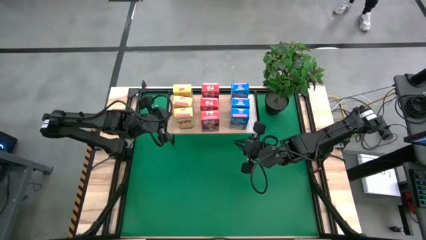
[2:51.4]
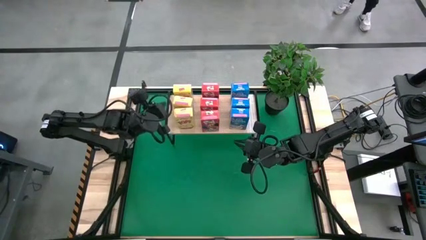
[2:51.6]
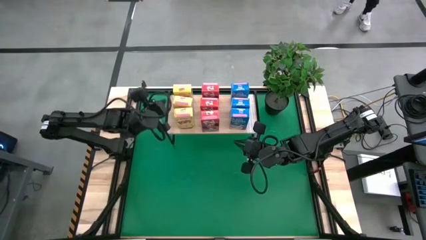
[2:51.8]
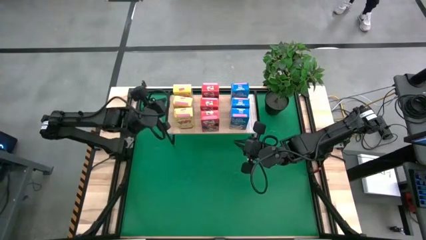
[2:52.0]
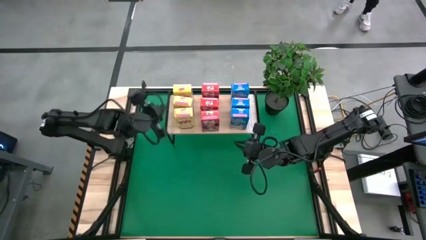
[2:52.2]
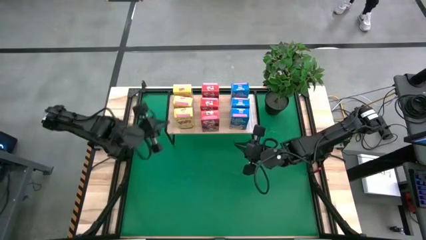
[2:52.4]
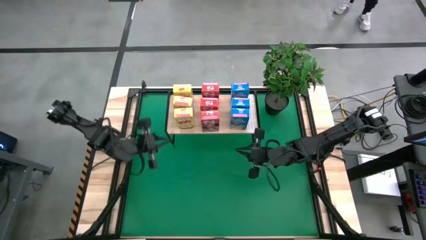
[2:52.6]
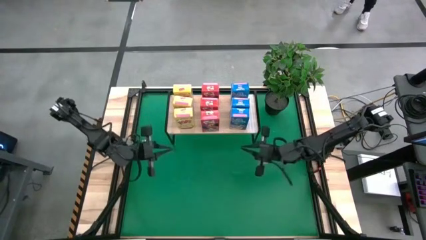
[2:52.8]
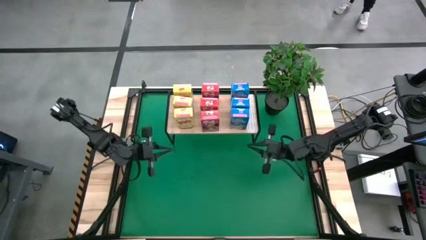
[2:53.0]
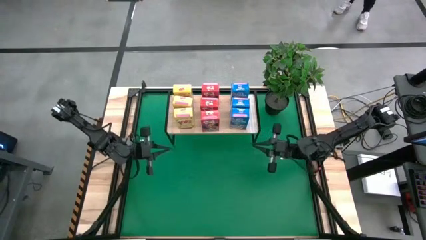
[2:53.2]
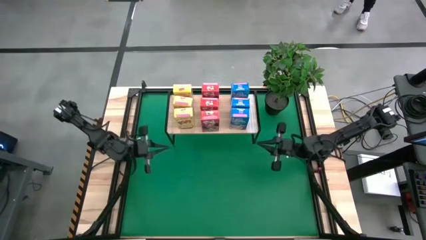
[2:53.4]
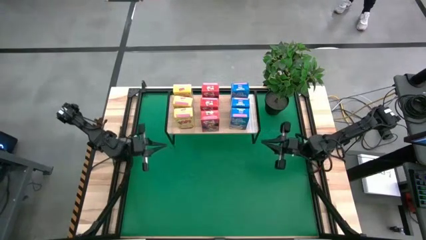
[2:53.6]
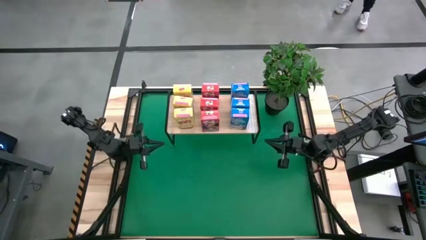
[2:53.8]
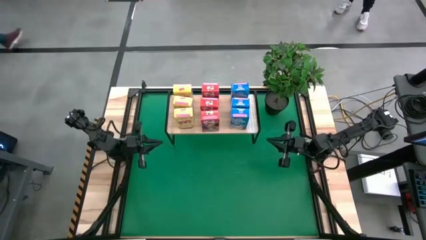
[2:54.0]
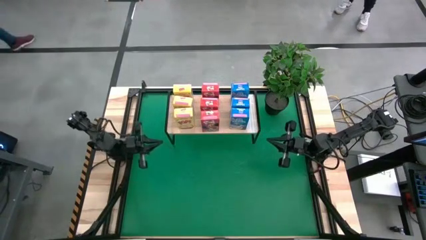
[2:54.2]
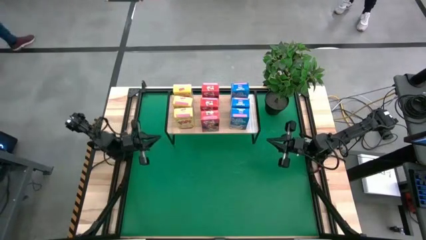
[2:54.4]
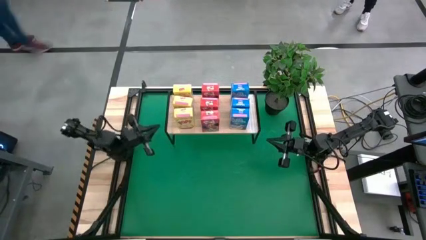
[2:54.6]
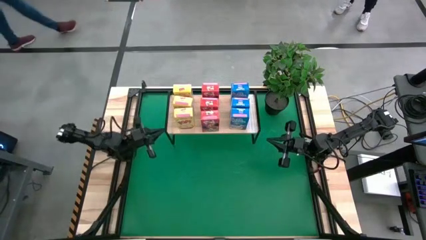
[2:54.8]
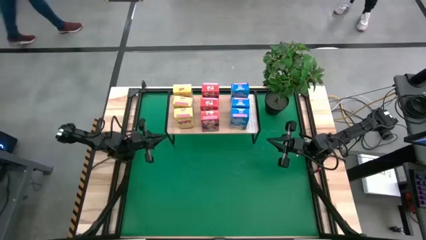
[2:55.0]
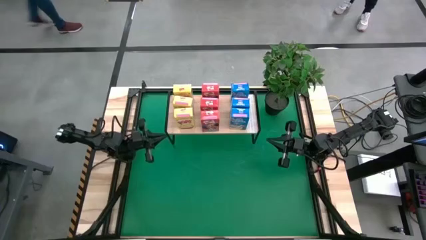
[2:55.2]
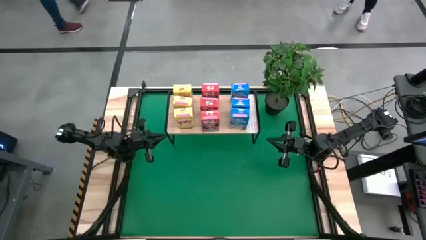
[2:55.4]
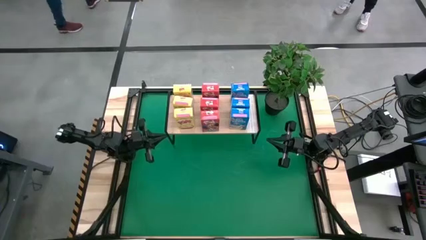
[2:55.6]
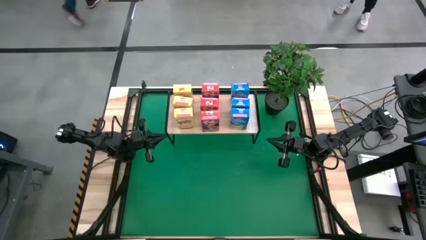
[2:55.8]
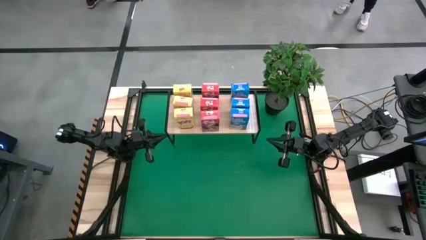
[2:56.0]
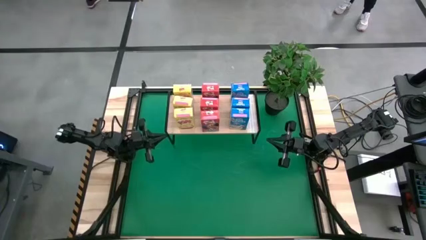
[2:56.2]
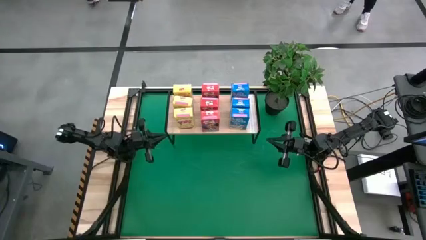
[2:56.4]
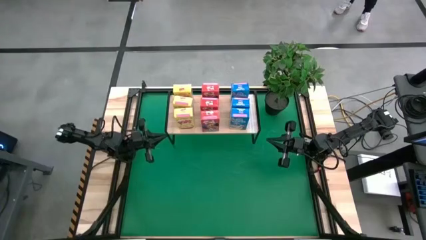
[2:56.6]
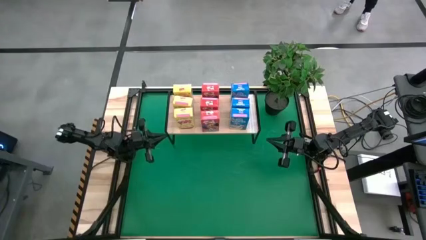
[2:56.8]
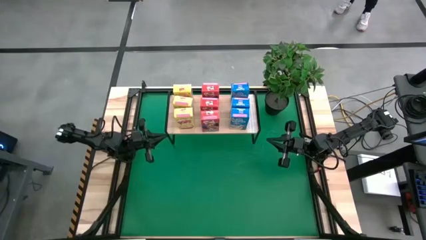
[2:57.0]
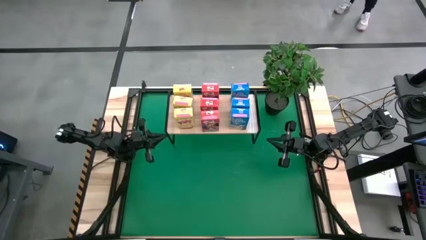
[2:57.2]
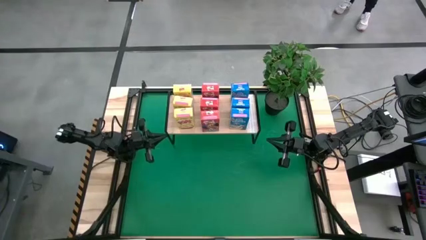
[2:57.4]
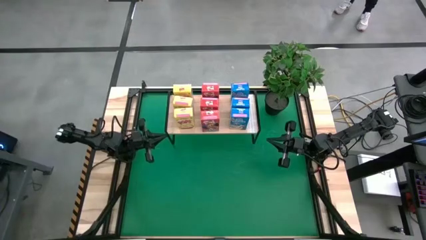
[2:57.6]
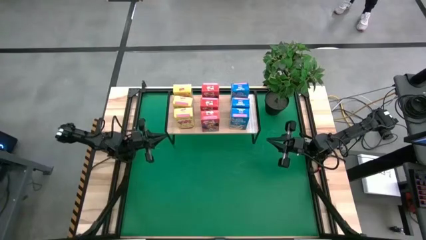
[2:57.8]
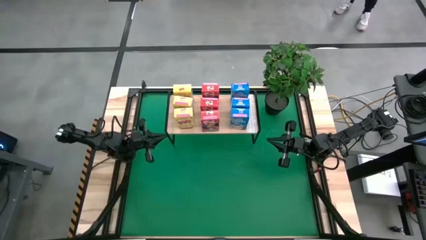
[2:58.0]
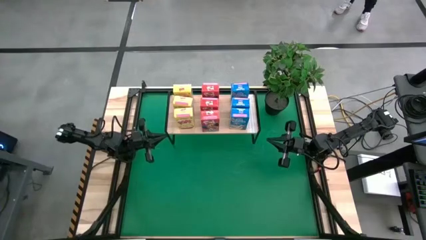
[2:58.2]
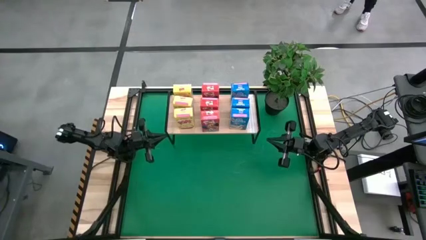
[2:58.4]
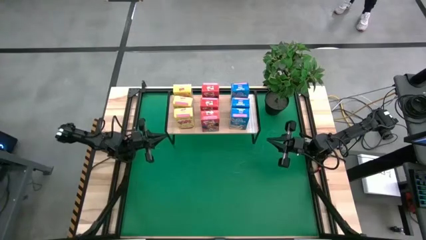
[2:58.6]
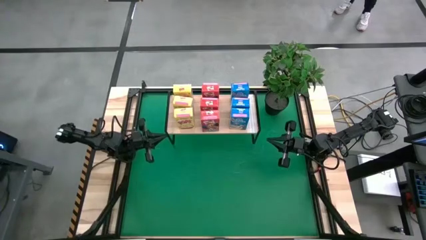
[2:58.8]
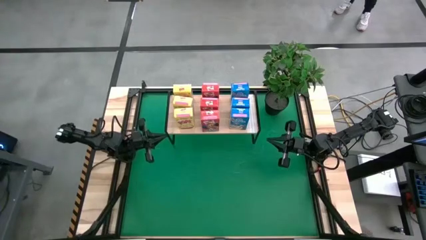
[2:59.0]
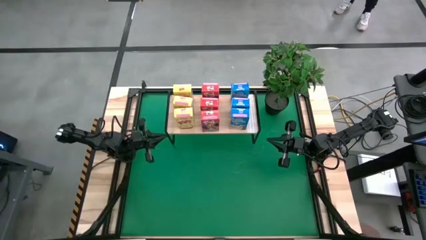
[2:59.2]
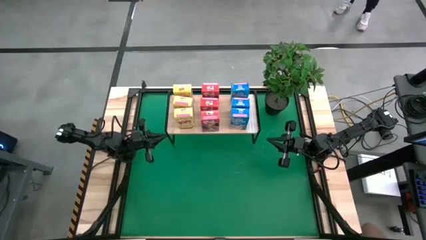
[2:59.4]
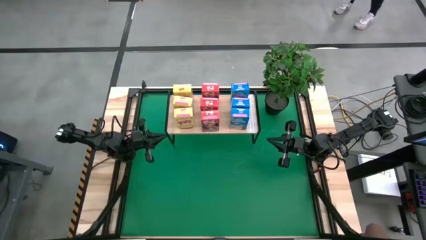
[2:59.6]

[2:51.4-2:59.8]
Task: Stack cereal on shelf
Return to Home Position

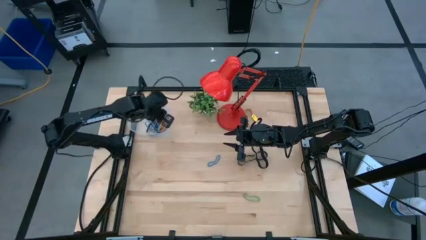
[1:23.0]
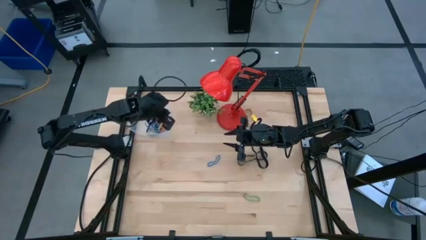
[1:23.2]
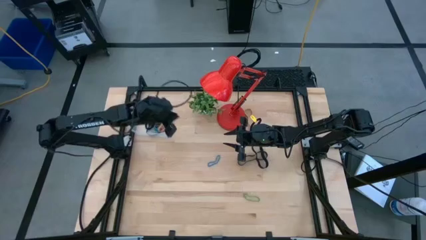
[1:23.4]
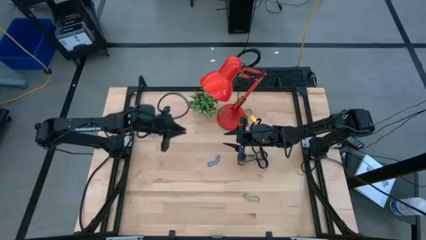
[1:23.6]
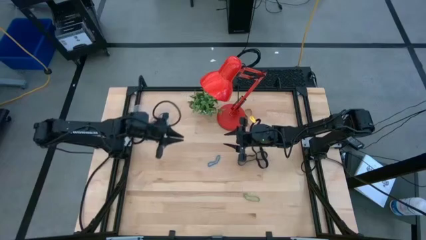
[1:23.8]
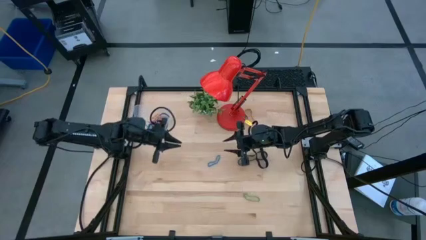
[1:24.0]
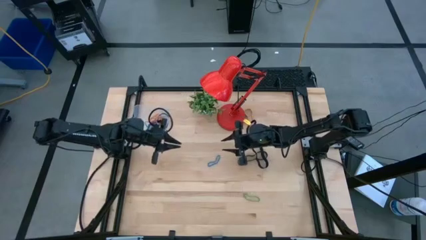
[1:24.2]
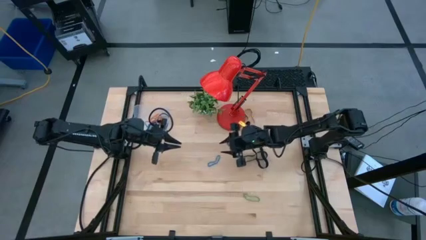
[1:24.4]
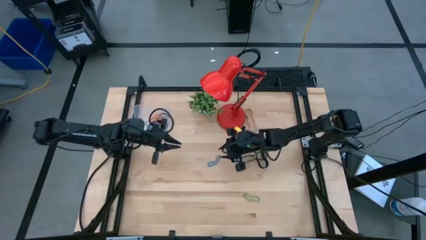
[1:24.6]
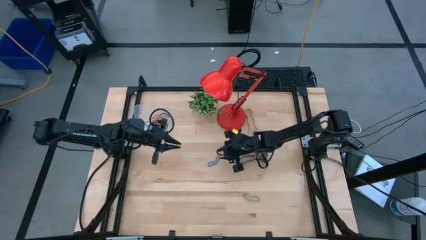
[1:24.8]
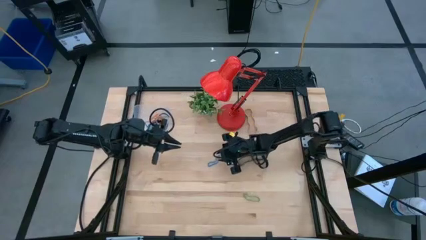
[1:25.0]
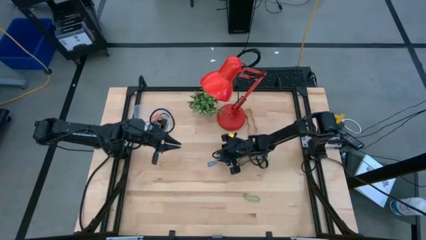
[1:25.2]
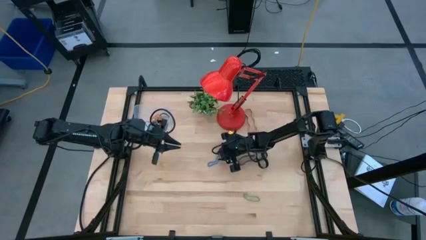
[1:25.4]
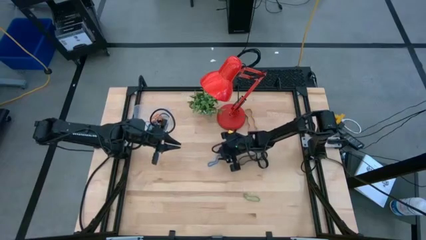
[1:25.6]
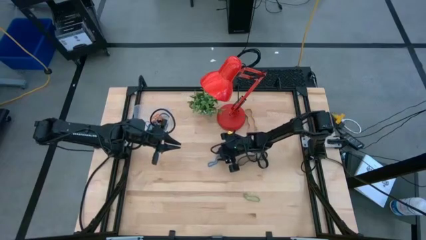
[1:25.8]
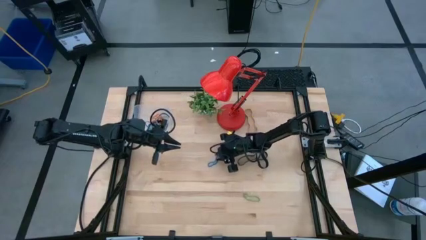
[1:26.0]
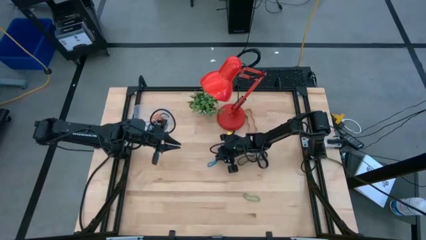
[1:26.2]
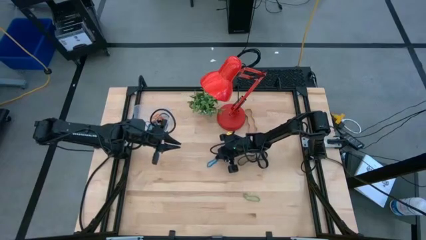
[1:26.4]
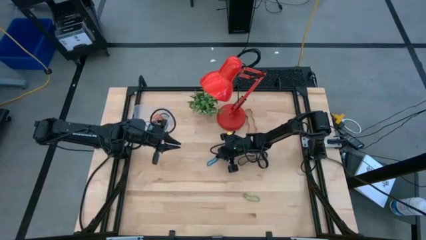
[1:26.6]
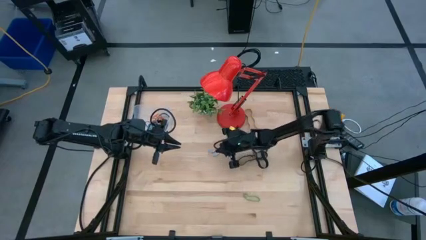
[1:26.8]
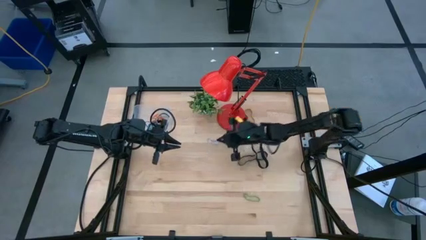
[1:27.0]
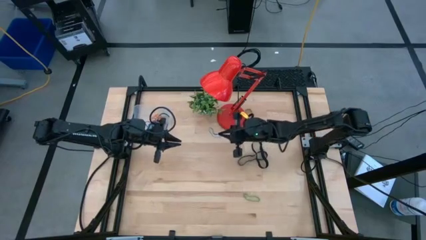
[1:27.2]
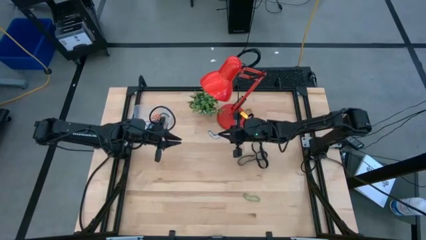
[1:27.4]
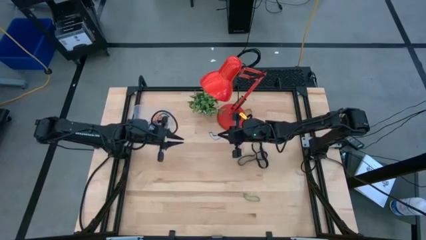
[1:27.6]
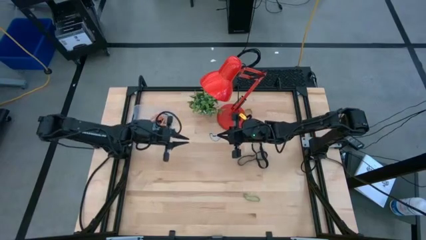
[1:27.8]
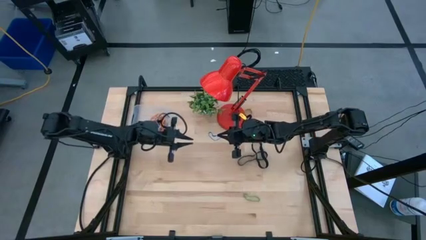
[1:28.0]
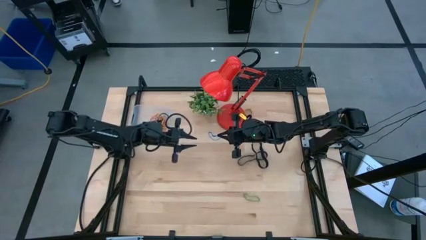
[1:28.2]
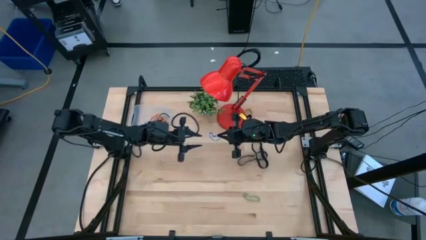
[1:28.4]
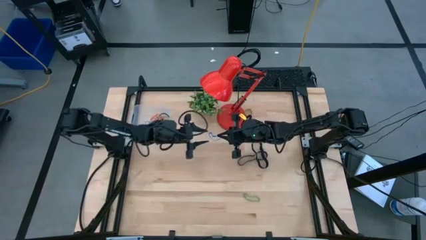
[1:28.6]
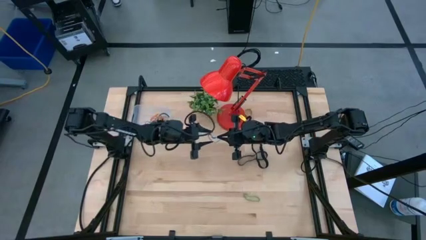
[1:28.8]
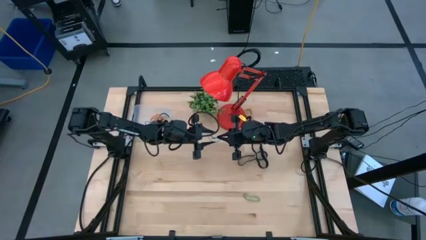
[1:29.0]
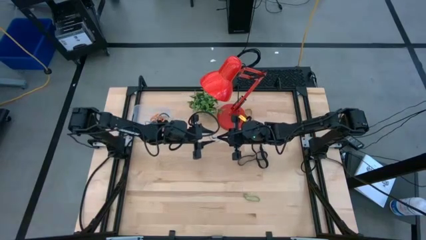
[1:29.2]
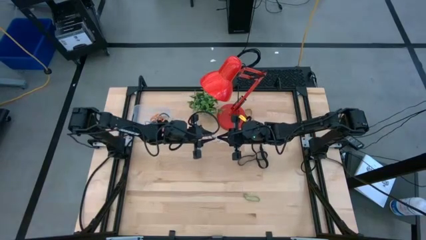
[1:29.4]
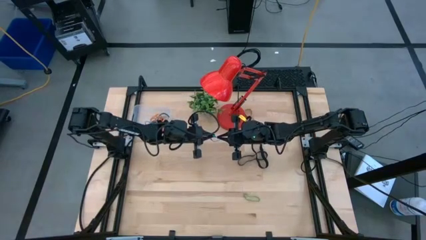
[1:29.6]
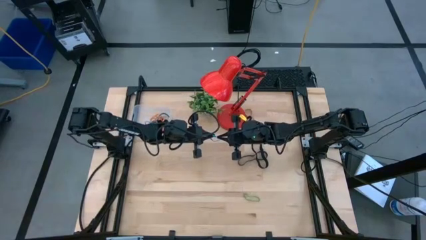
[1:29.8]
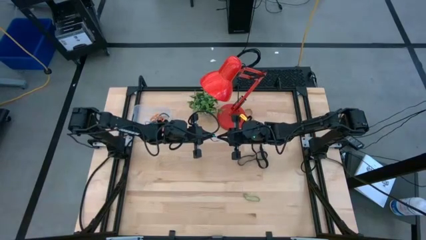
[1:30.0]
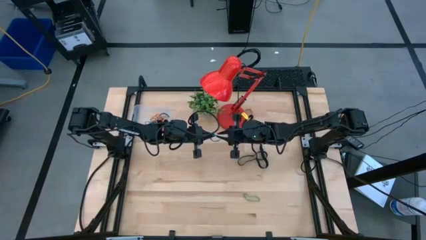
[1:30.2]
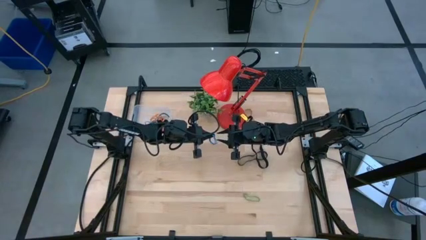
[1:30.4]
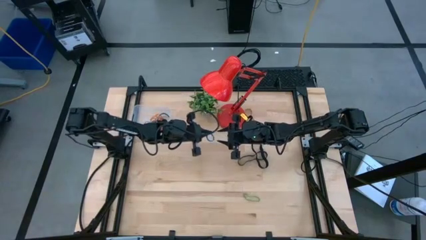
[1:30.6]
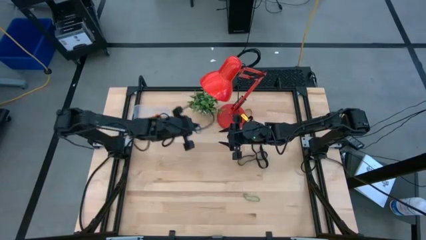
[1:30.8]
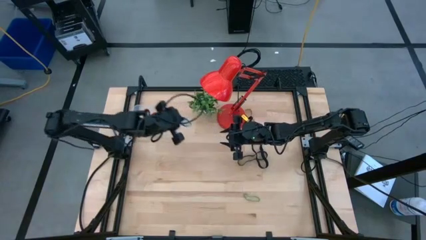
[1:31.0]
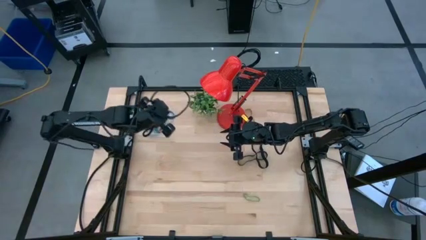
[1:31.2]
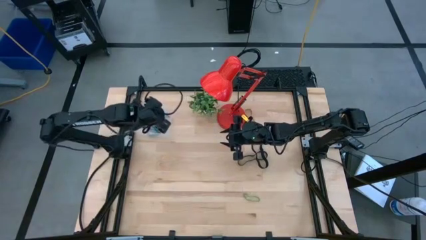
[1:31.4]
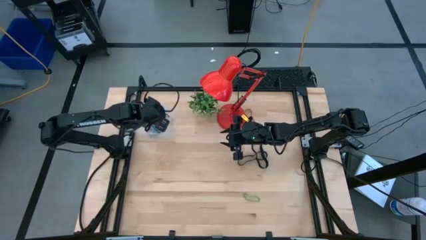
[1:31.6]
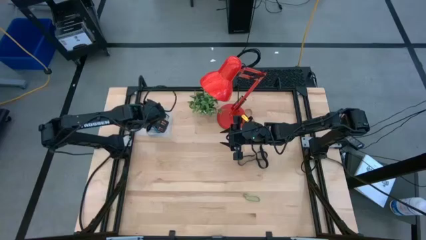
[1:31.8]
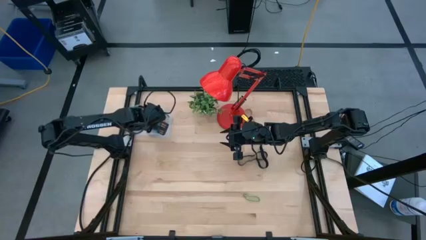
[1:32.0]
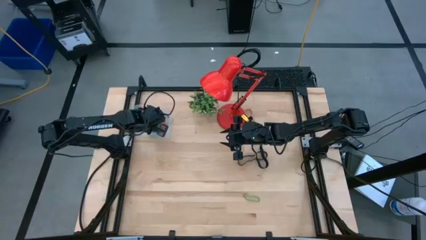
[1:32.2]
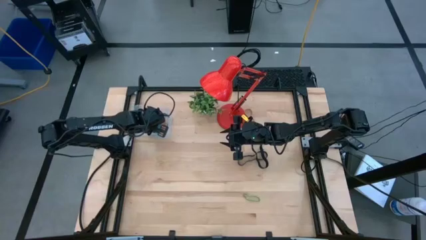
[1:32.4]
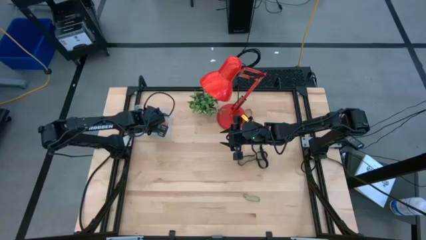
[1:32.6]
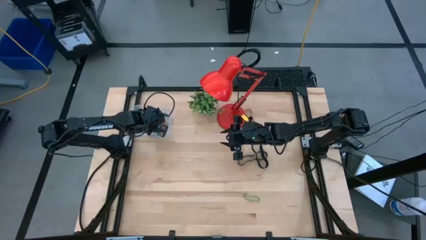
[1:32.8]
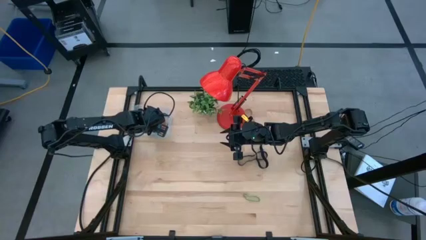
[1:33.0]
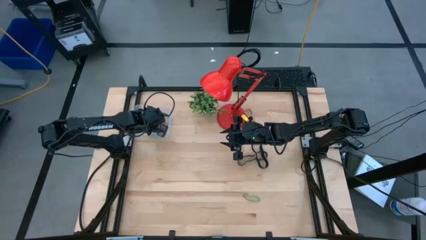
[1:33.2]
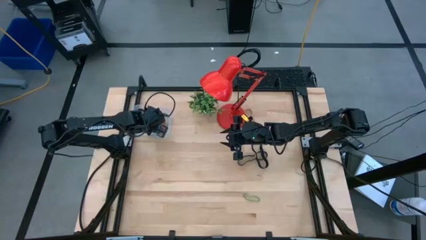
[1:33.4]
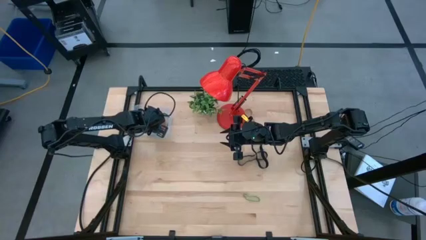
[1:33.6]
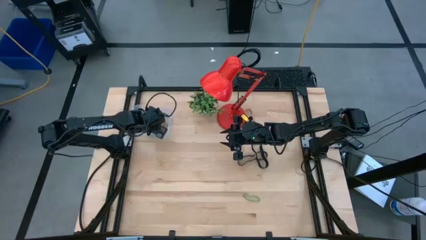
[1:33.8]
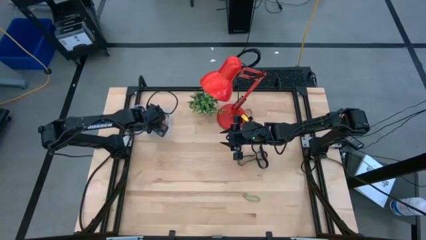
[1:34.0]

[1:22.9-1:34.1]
Task: Pick and place rubber bands into bin
Put the blue rubber band into the transparent bin
